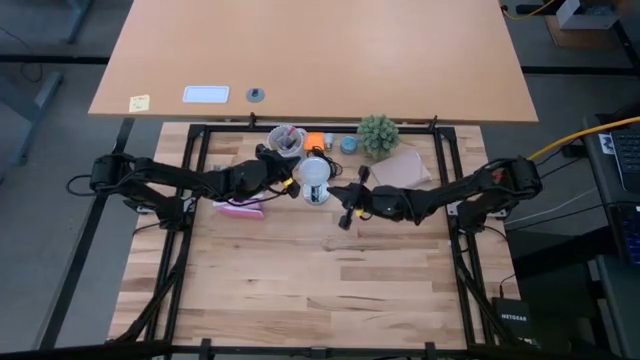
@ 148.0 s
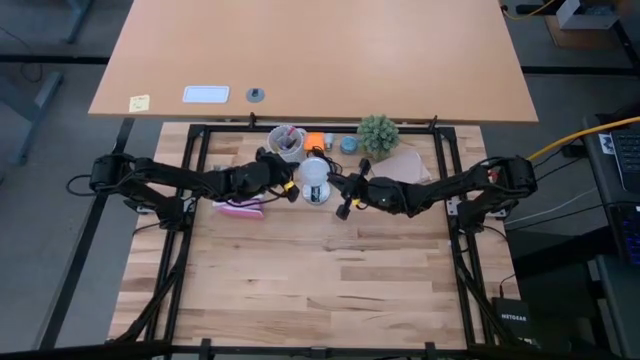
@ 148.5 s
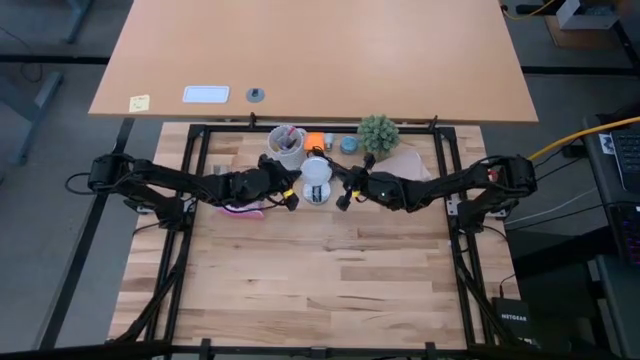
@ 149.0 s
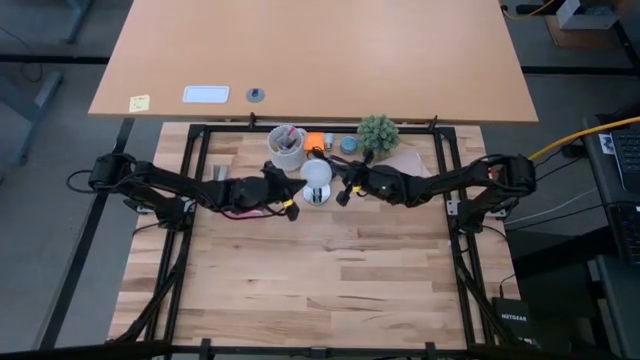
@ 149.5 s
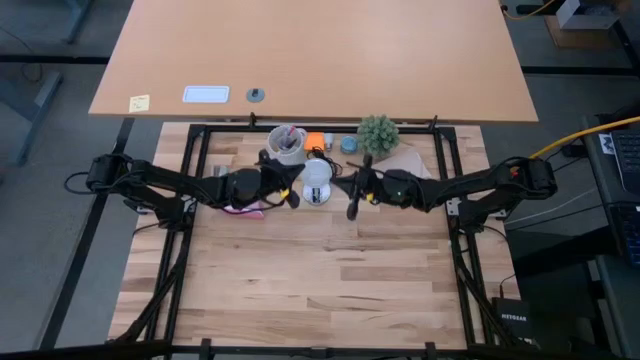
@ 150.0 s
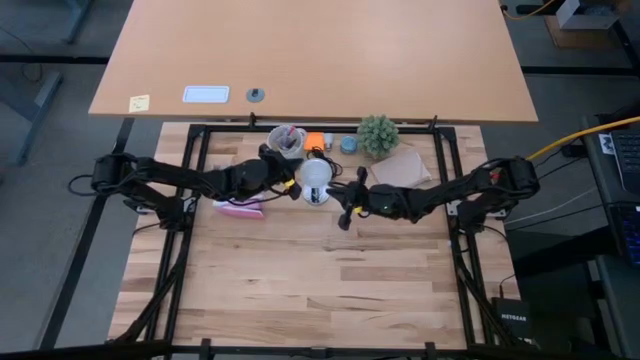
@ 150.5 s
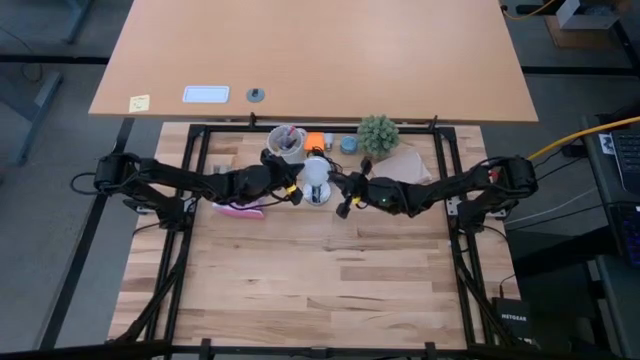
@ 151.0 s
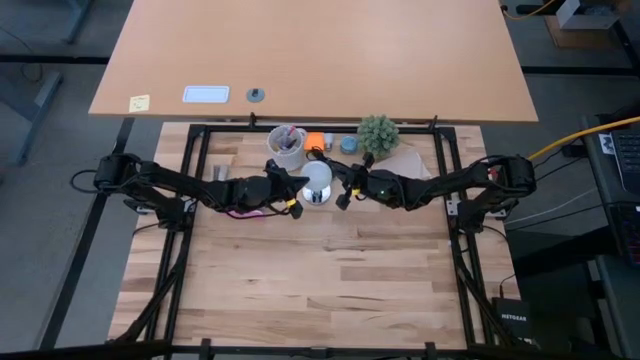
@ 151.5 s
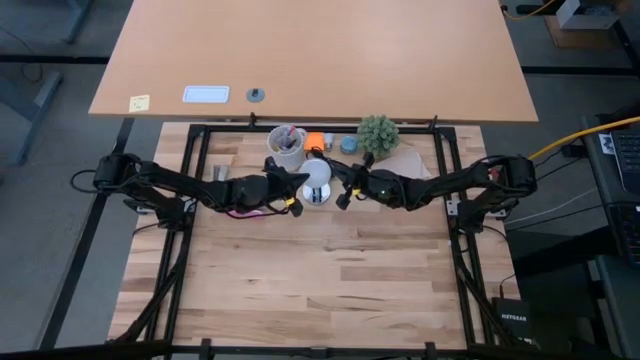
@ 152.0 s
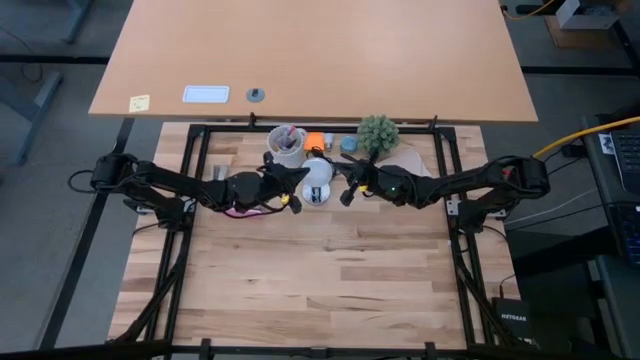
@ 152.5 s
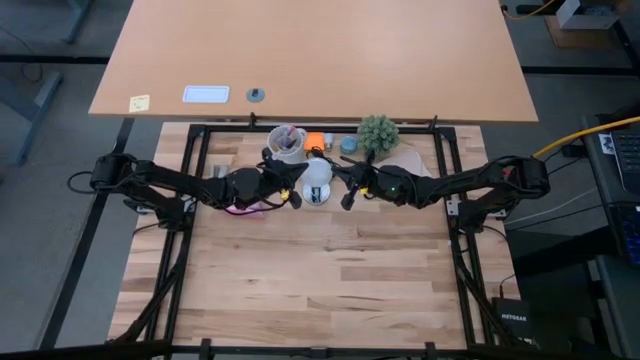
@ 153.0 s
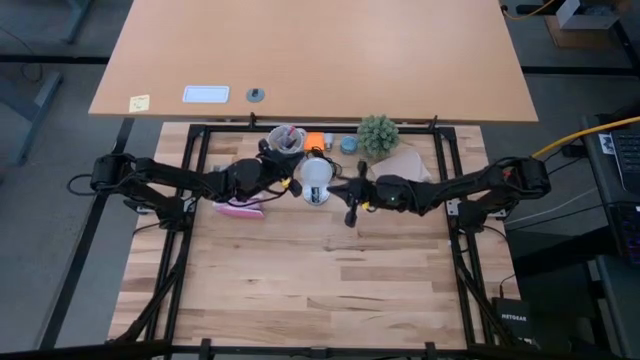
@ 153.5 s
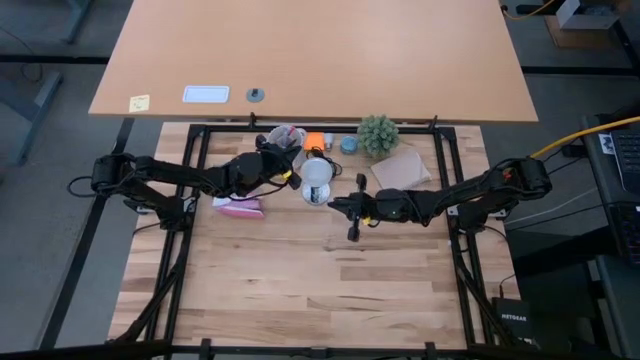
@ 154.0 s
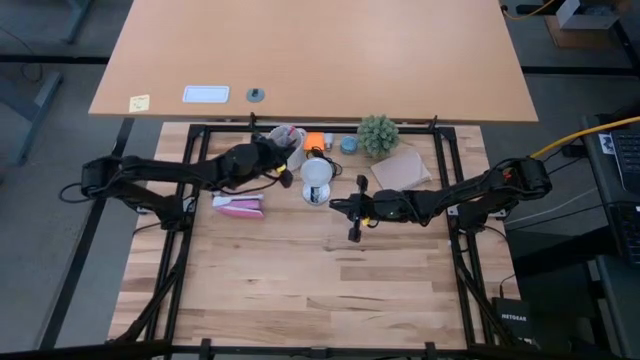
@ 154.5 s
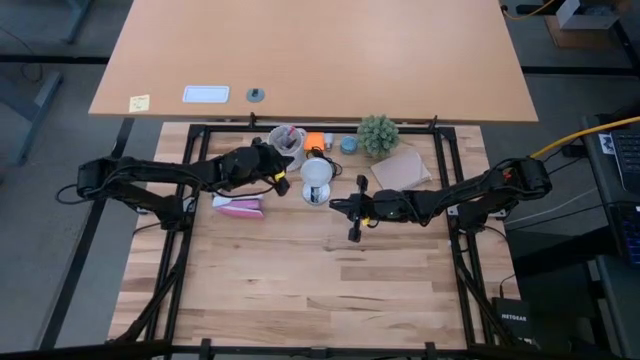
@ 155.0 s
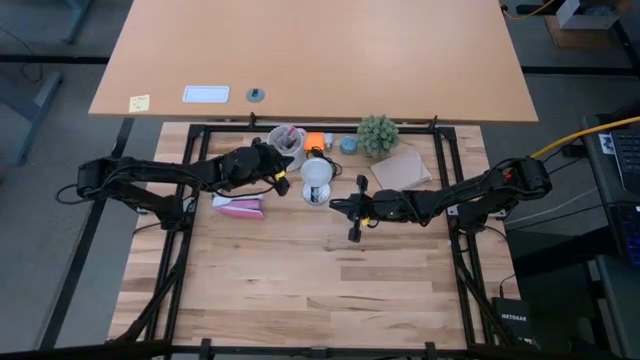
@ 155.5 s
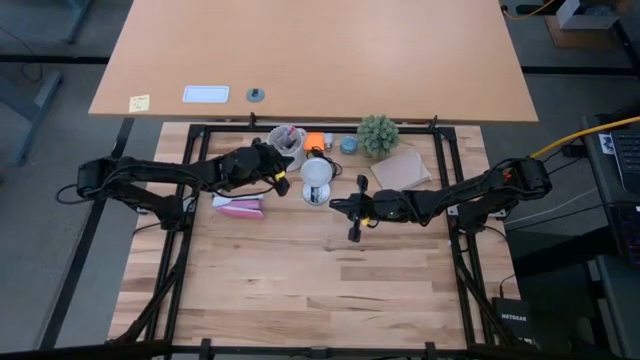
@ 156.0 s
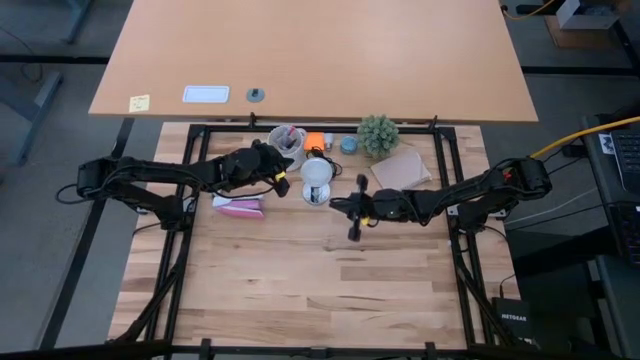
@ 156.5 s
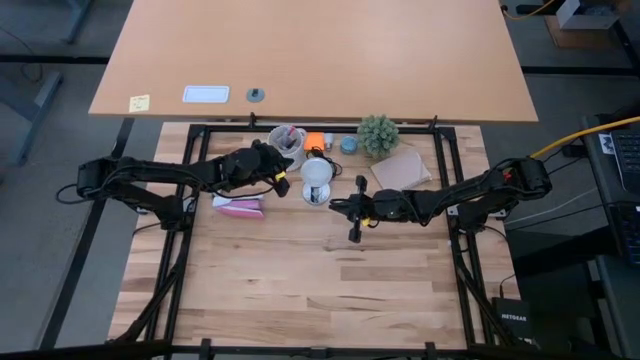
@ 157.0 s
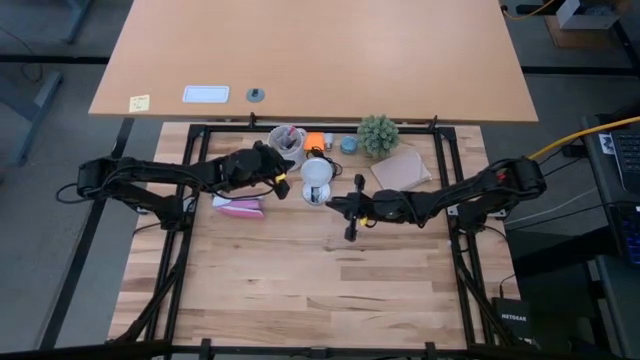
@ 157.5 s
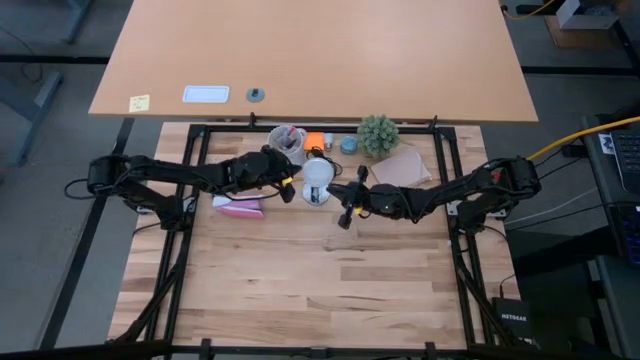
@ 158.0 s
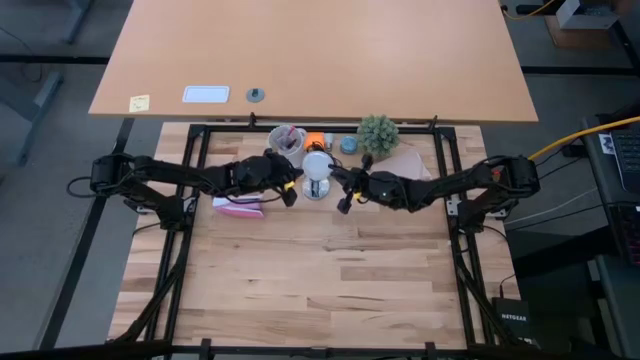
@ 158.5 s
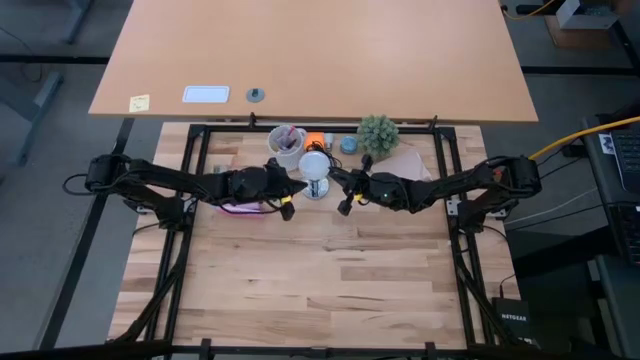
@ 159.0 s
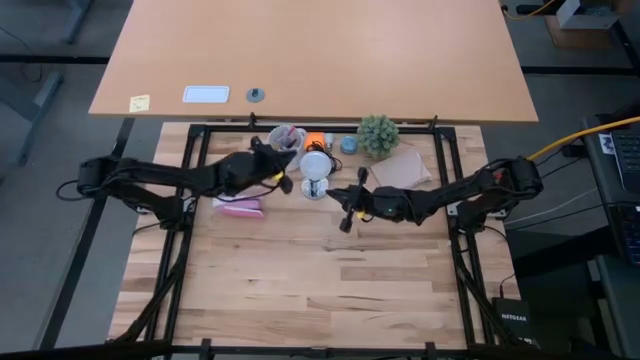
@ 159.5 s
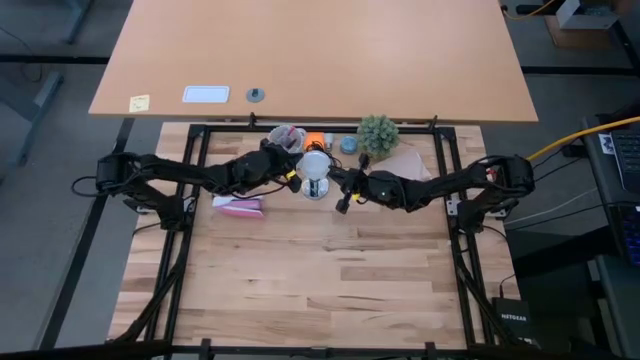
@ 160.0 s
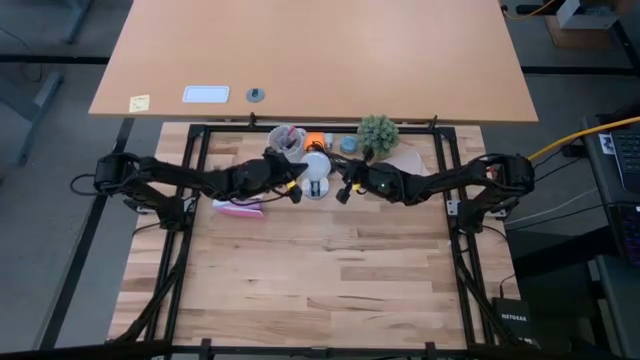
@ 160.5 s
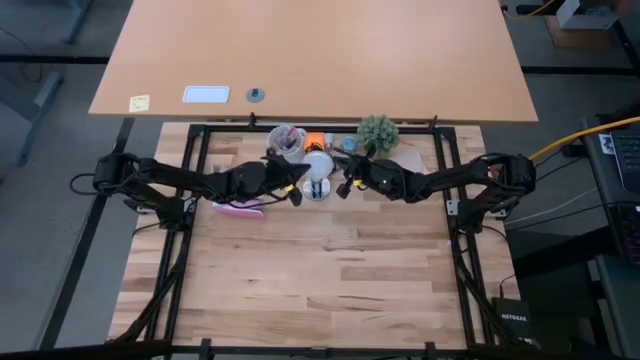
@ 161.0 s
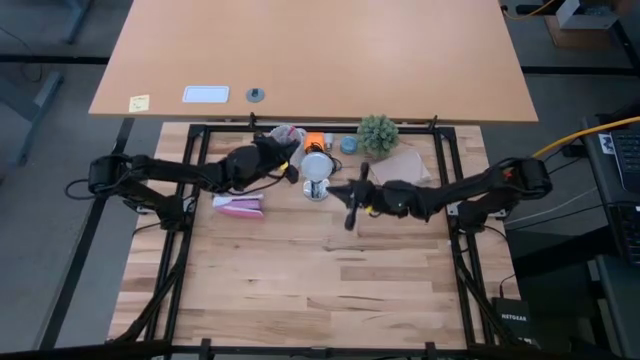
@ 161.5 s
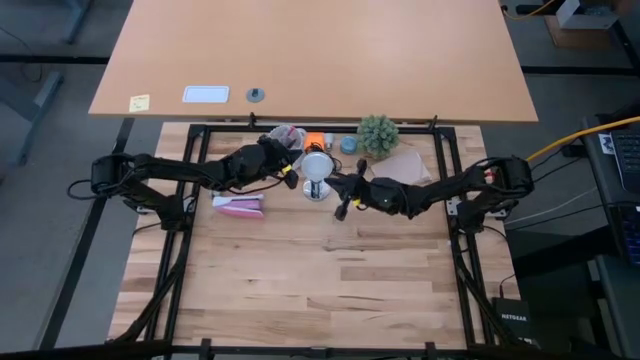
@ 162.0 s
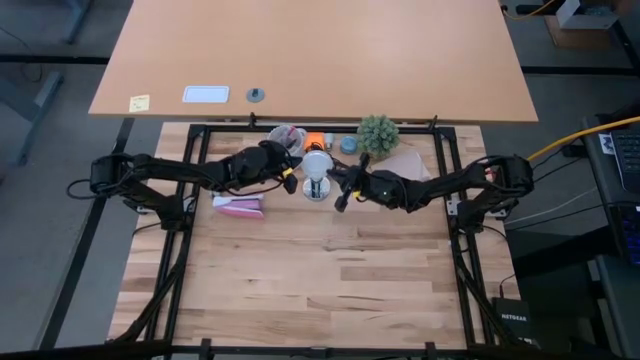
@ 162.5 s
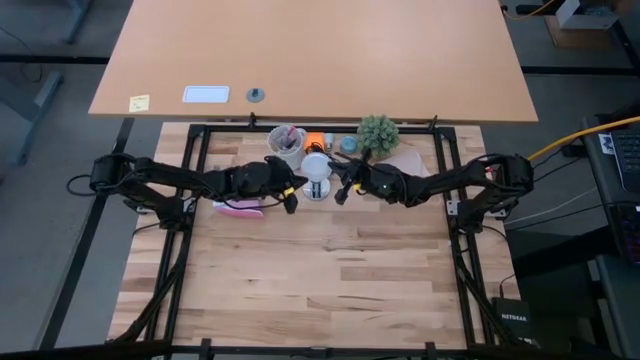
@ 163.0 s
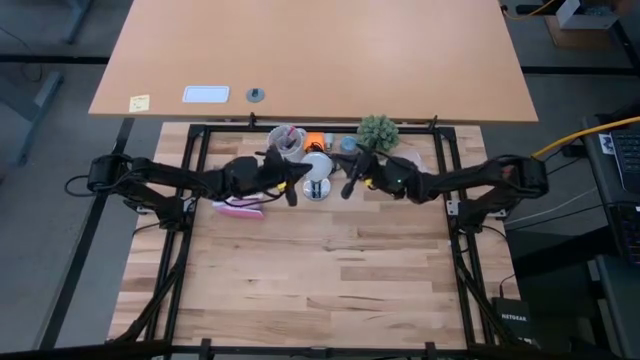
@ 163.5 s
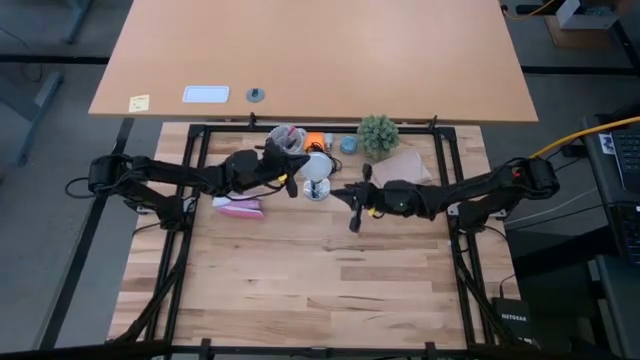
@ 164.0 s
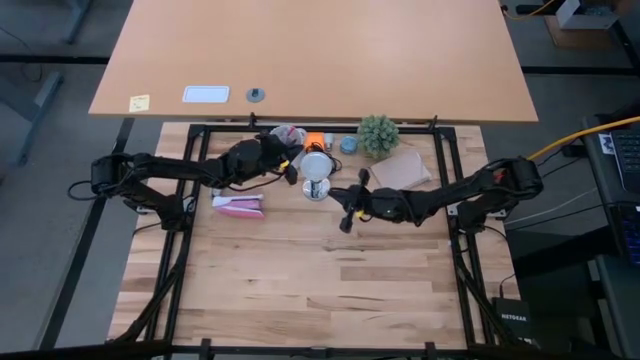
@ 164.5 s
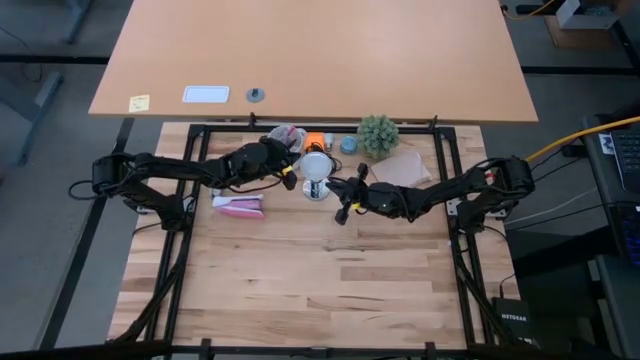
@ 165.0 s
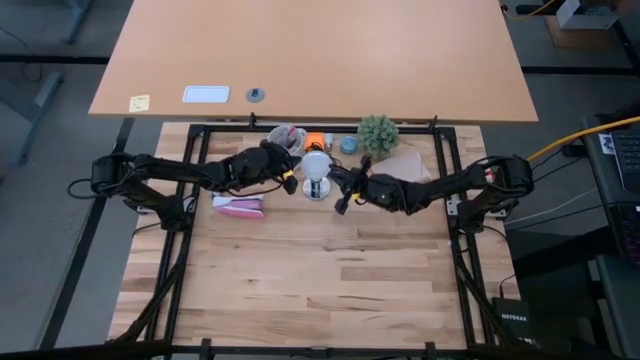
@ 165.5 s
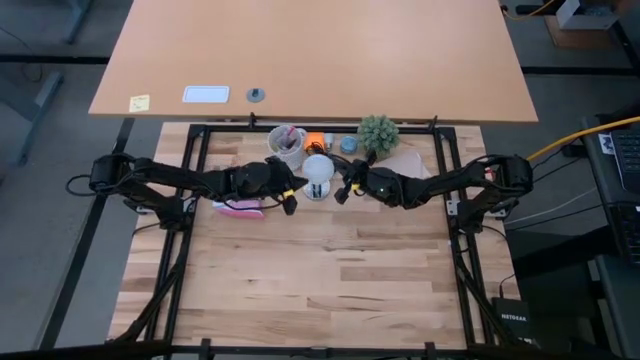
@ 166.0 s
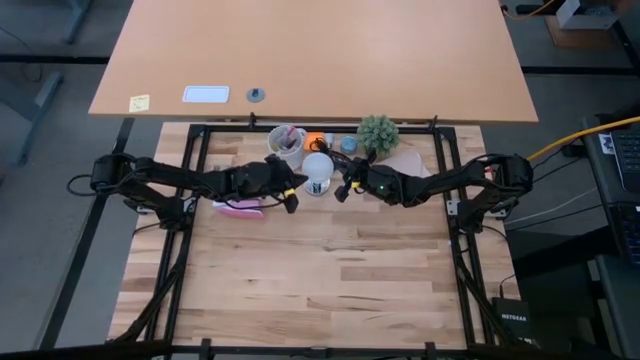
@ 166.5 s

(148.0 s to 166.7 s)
Task: Screw lightbulb
Remove the white light bulb from the silver lamp
